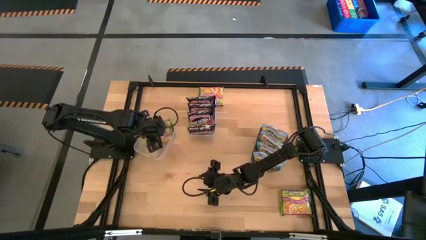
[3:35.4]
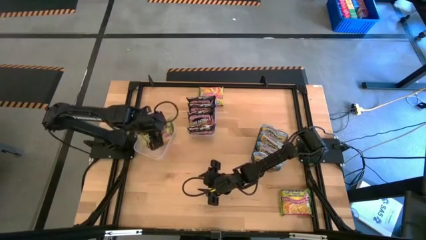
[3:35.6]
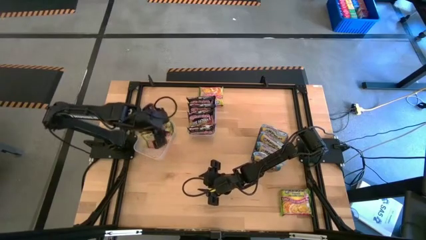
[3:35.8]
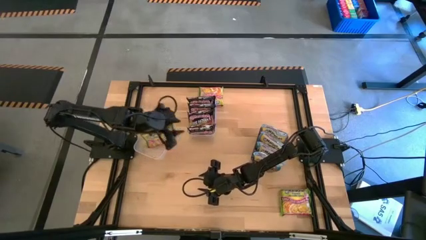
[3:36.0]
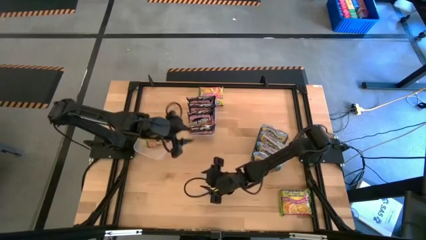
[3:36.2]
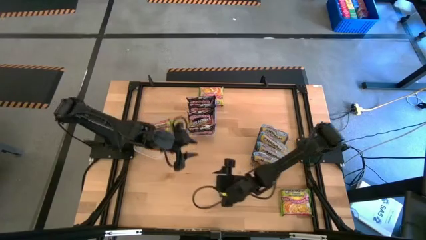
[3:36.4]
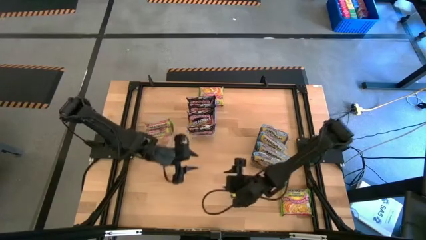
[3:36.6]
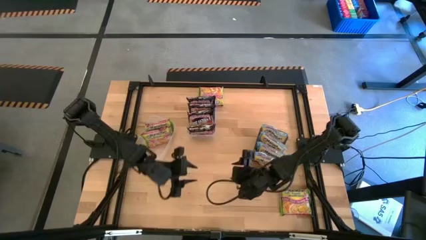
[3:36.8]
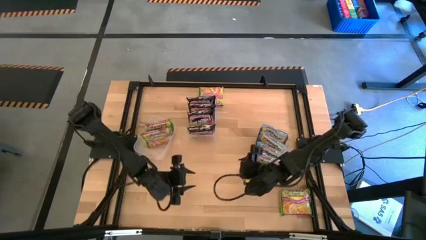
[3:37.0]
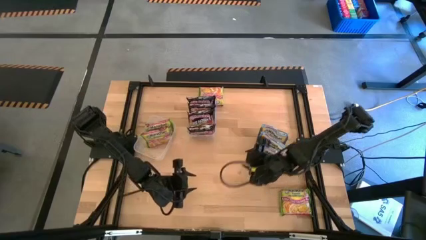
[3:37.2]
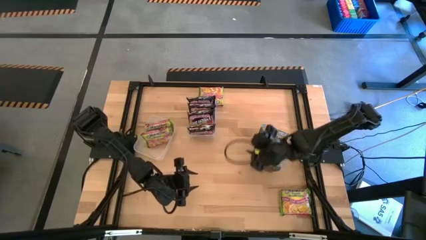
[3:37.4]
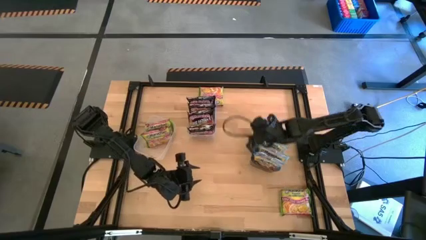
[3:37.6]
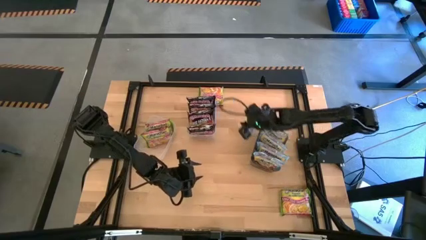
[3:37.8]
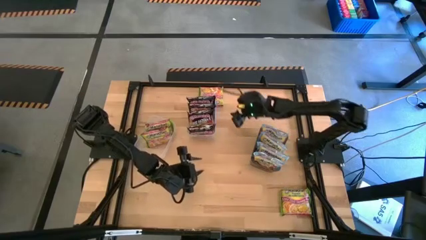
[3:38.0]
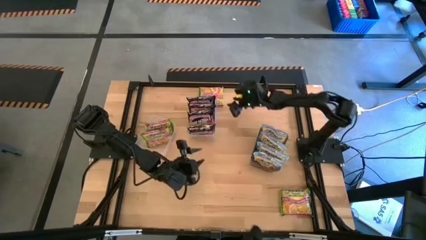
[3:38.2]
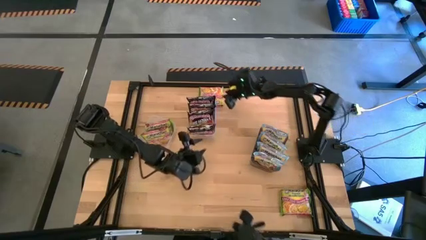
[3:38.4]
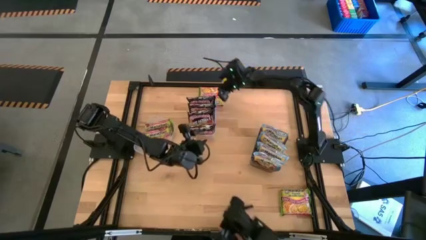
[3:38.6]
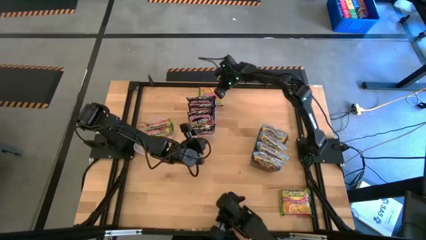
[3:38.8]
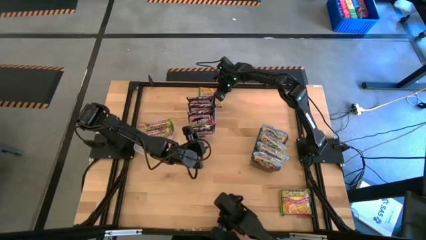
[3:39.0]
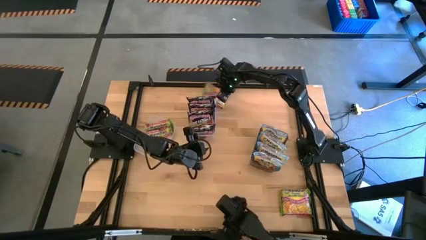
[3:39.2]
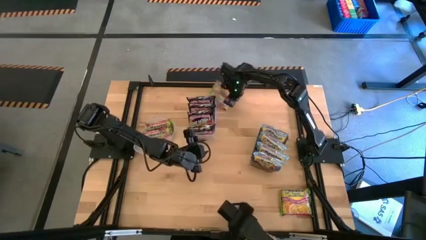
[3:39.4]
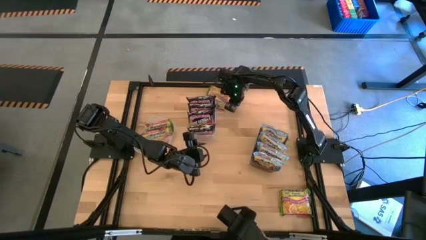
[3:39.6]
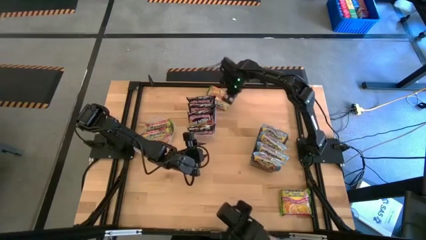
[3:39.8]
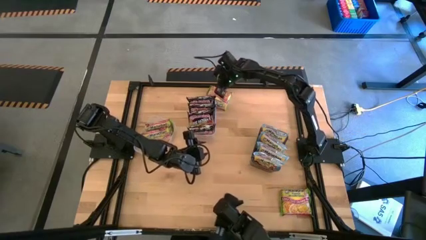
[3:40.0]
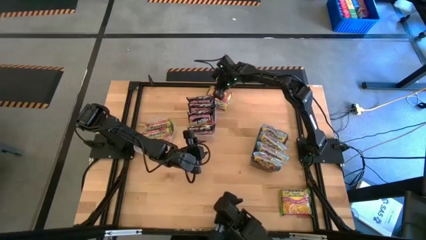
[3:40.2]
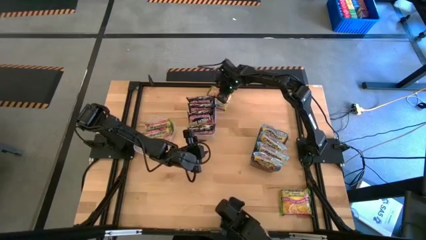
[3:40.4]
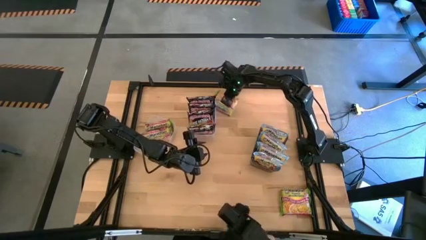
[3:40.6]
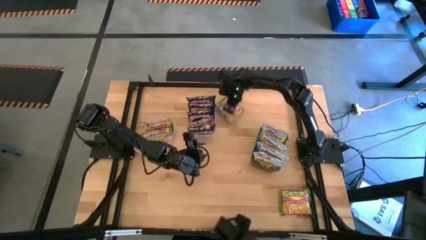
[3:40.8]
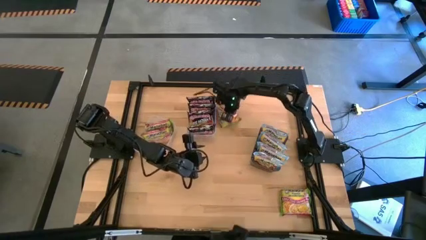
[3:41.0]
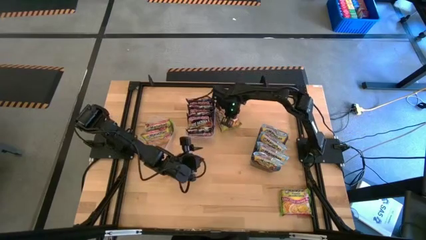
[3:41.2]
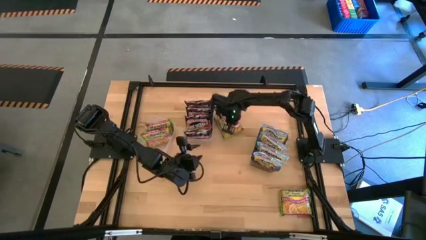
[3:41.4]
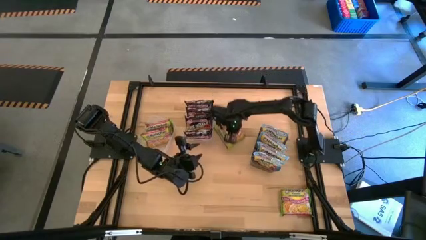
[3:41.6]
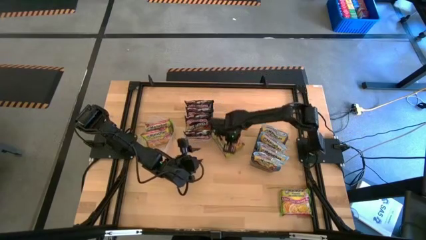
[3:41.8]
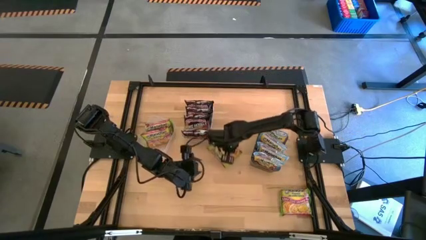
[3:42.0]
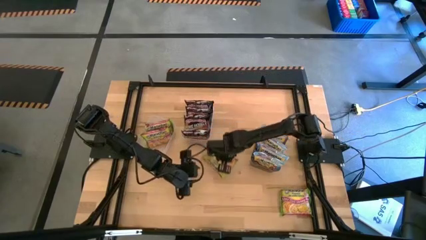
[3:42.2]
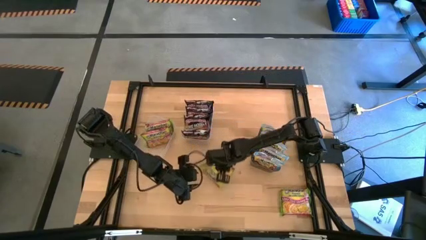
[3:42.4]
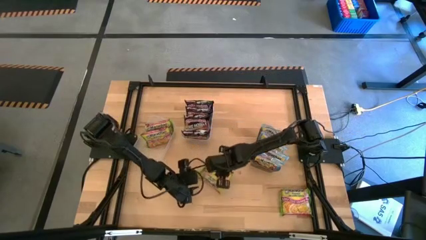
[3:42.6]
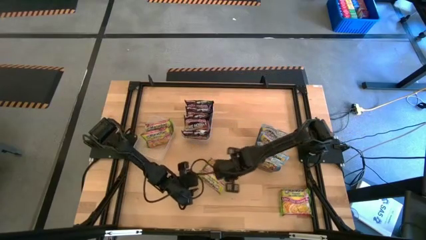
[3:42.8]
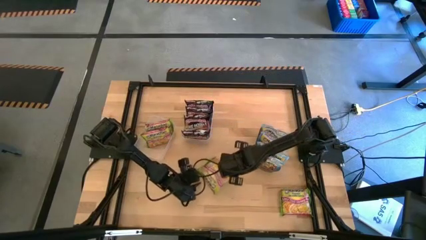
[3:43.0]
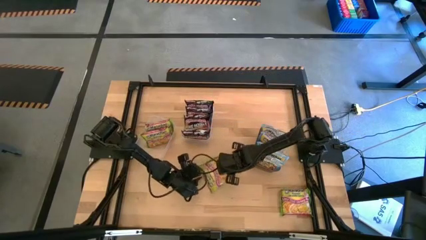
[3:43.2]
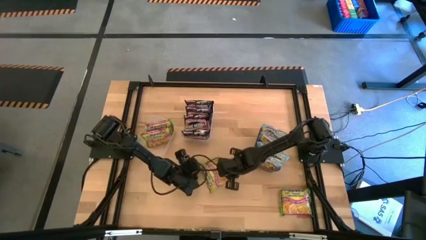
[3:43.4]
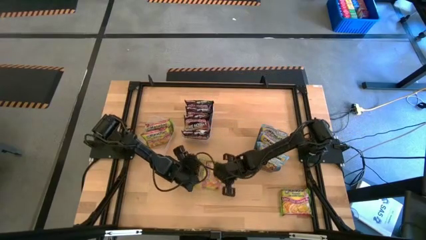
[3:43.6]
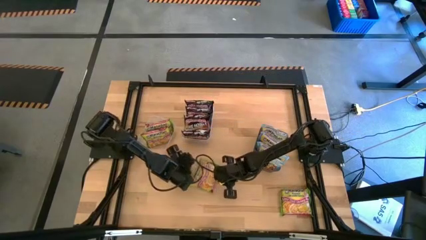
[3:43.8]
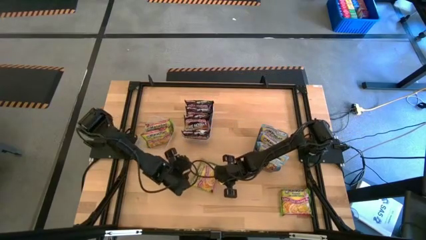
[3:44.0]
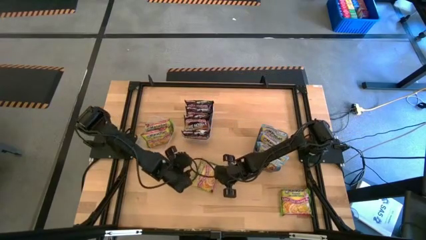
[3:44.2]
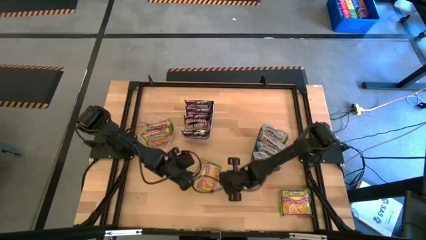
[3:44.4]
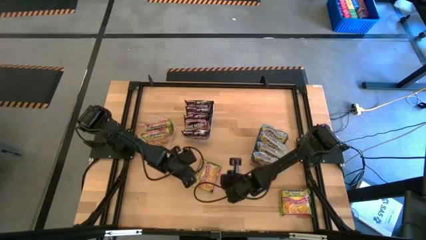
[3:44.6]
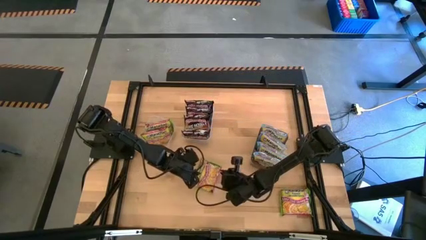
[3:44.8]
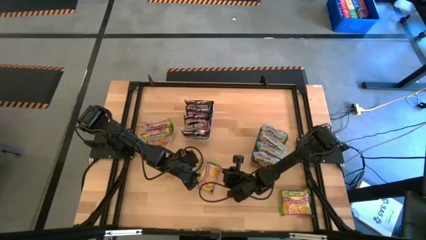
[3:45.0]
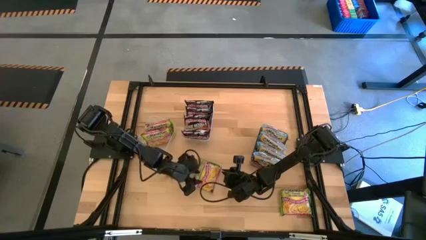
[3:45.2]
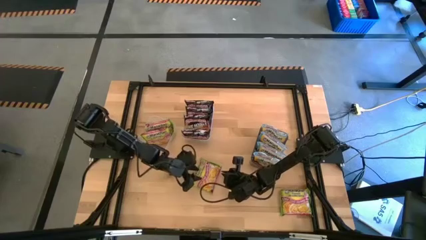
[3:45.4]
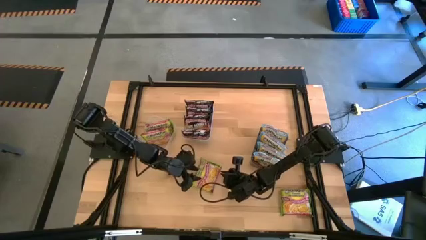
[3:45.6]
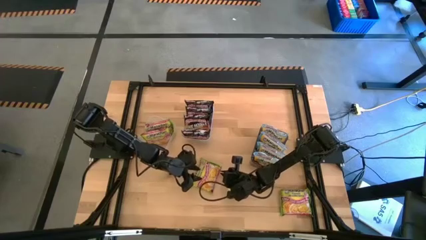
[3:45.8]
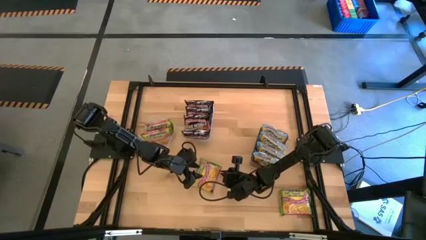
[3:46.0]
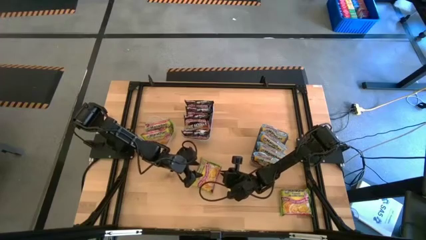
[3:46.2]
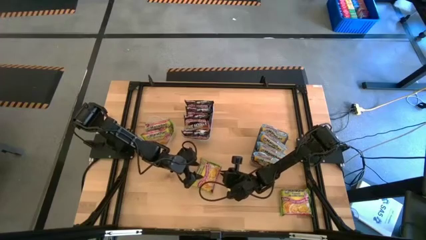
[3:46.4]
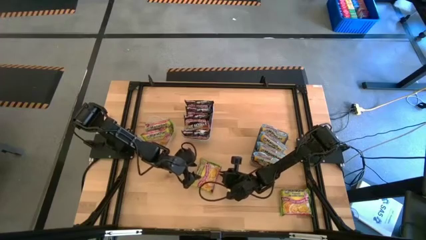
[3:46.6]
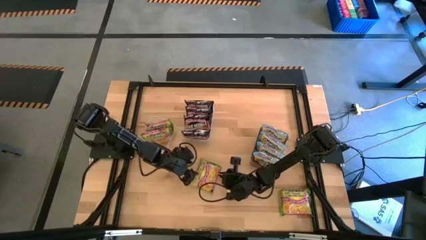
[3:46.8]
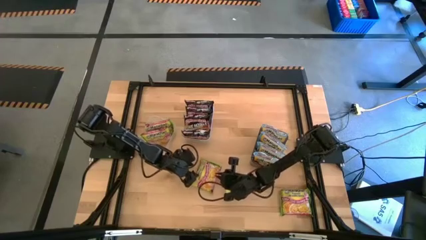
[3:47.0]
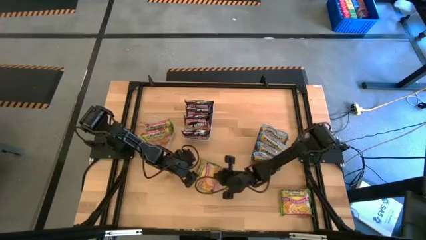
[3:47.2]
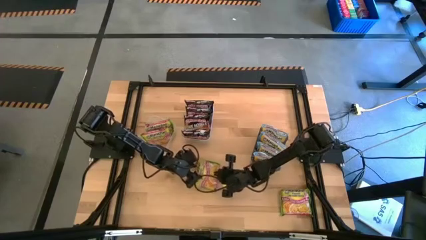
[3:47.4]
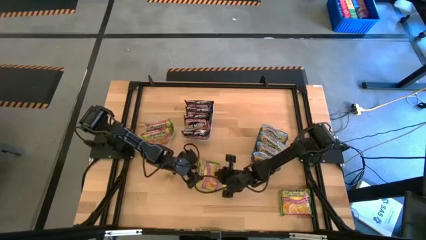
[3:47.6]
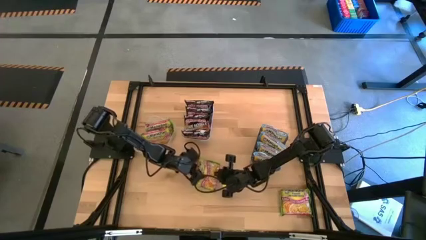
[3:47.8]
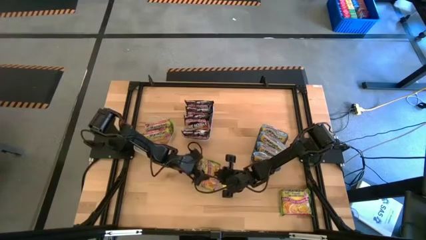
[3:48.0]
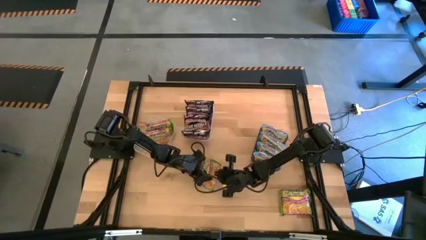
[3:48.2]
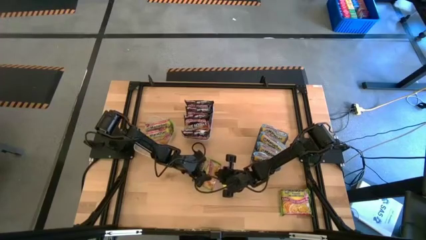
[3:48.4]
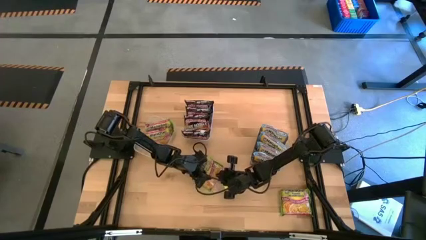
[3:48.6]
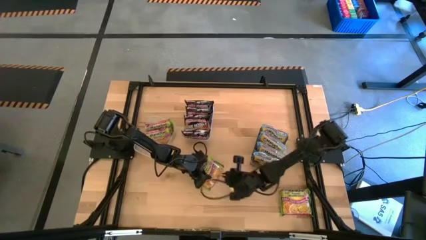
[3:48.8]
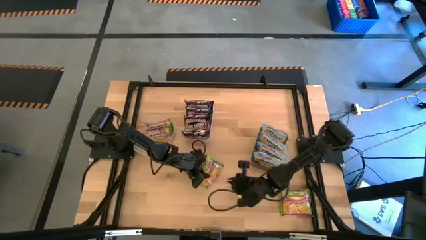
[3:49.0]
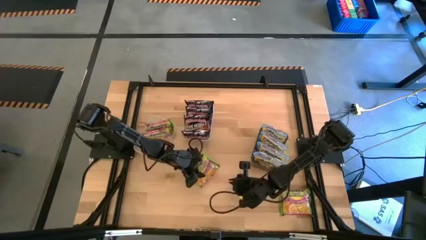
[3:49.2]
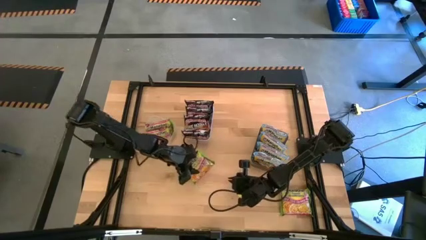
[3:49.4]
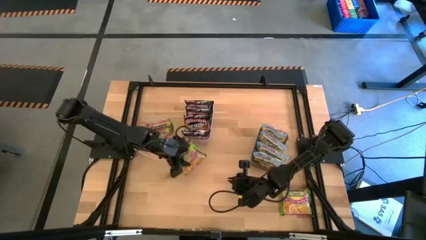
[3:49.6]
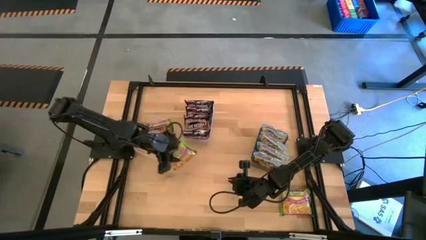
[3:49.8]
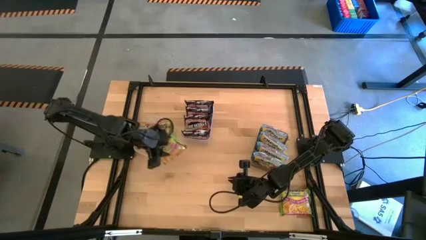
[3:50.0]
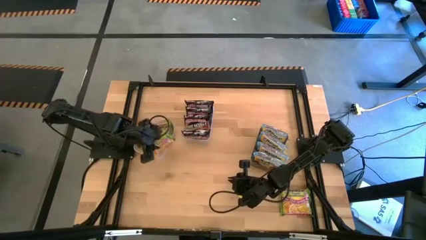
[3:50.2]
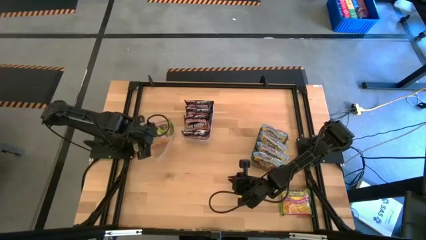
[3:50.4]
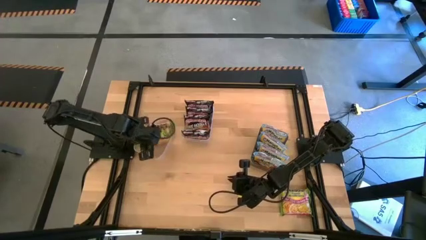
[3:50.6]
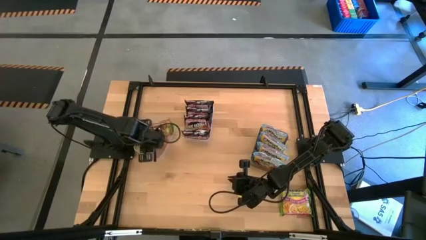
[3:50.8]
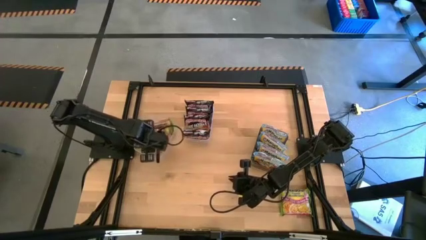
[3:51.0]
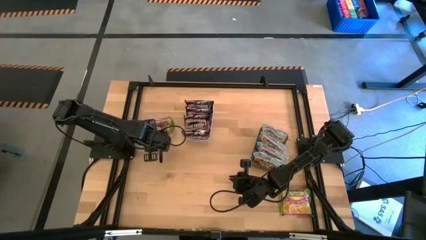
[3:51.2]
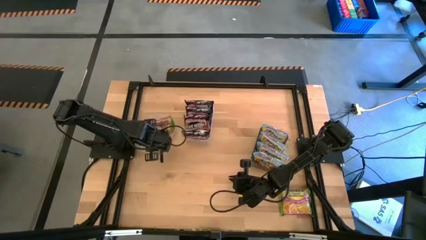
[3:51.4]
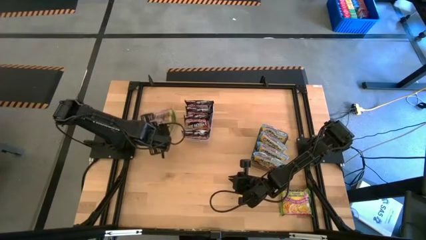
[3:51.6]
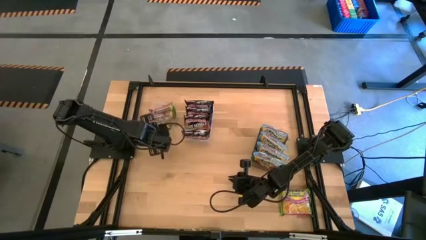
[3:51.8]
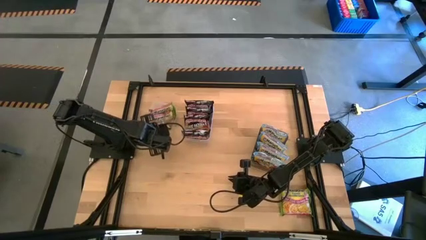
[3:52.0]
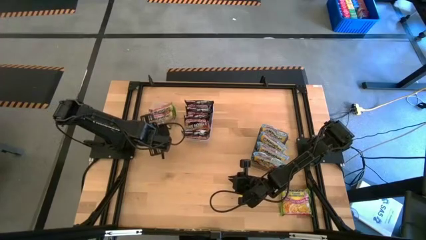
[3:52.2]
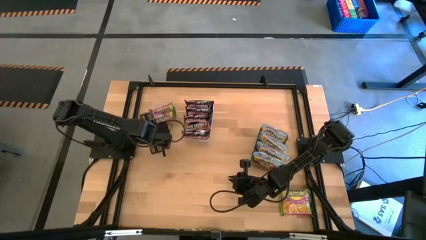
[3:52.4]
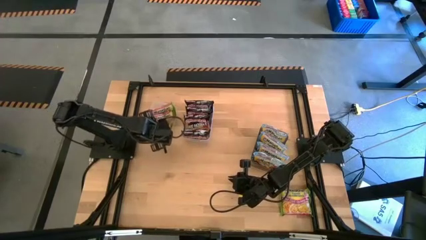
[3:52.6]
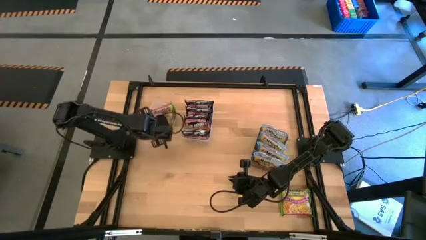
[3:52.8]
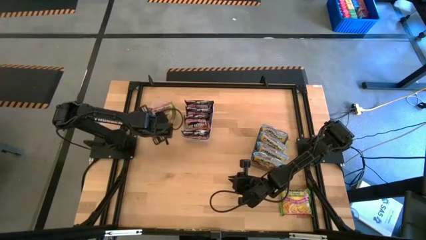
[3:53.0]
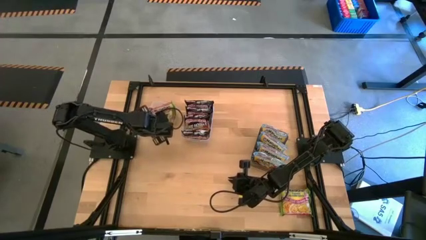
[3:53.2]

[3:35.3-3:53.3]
Task: Sort Maruchan noodles
Put the green noodle pack into the left transparent bin
